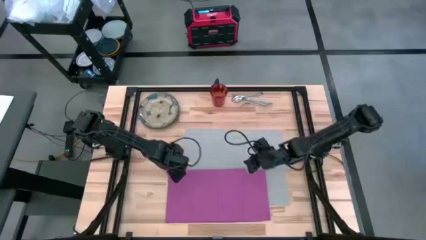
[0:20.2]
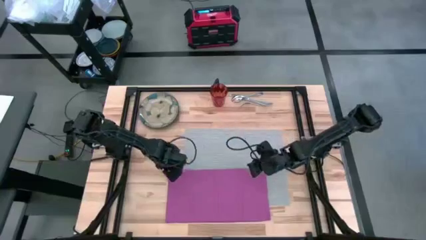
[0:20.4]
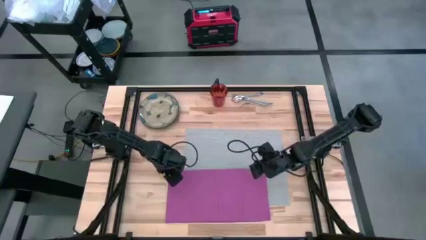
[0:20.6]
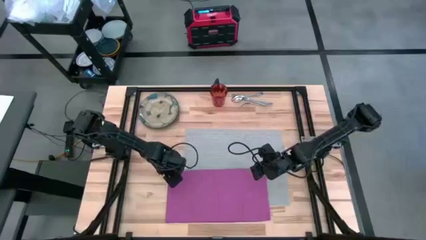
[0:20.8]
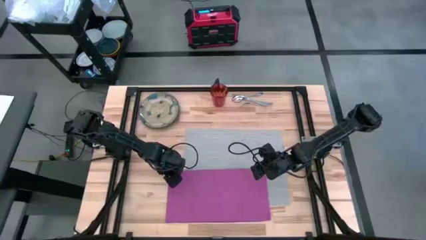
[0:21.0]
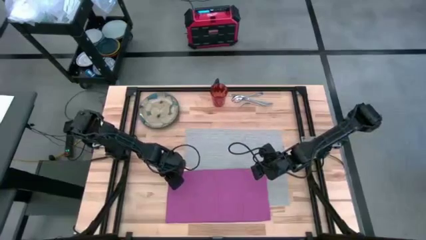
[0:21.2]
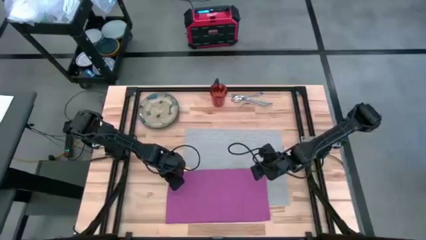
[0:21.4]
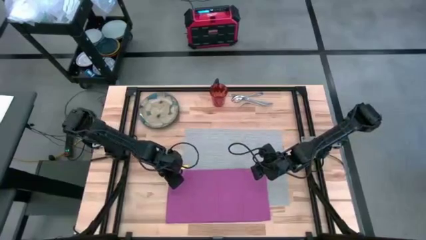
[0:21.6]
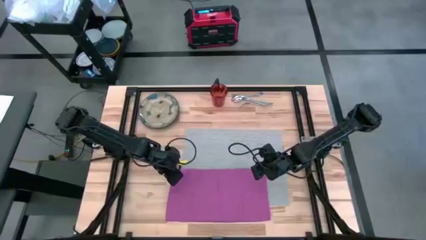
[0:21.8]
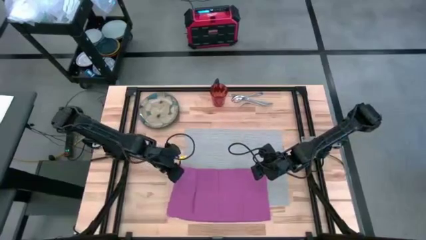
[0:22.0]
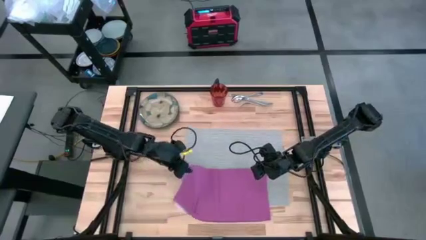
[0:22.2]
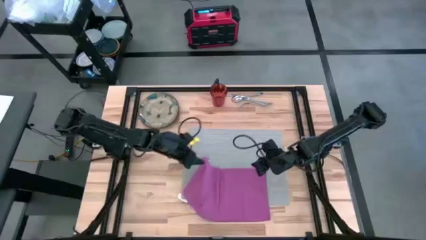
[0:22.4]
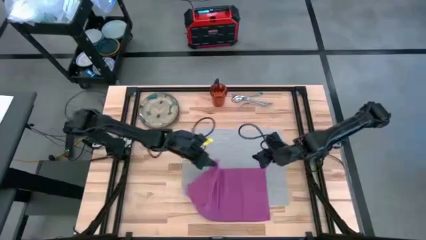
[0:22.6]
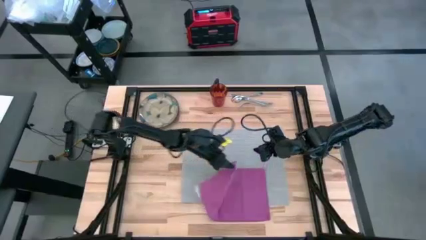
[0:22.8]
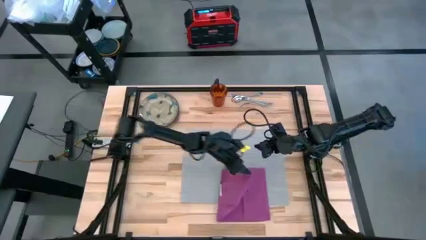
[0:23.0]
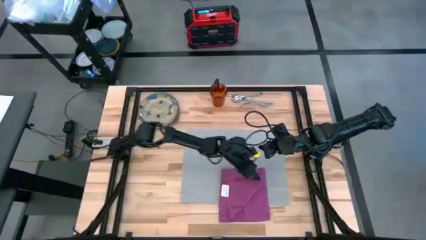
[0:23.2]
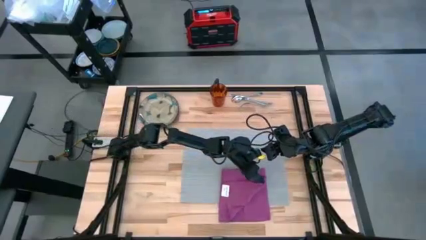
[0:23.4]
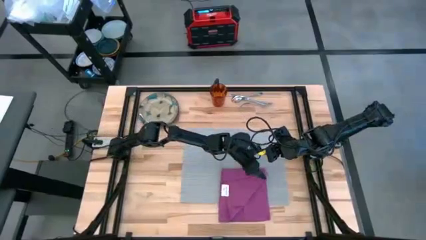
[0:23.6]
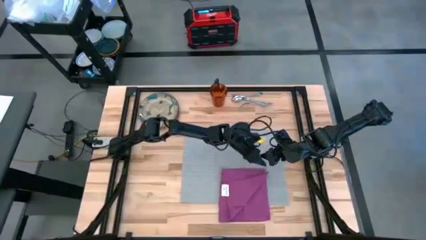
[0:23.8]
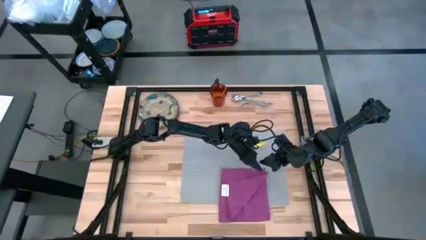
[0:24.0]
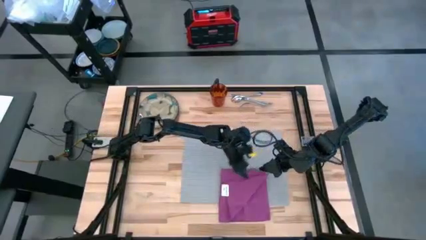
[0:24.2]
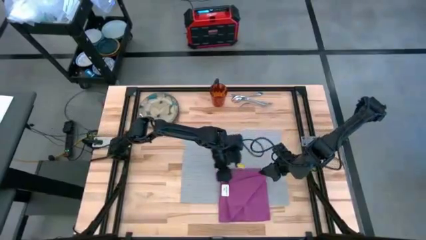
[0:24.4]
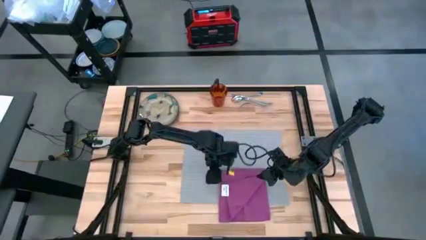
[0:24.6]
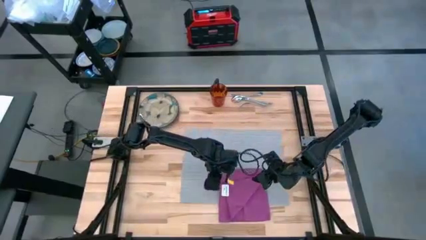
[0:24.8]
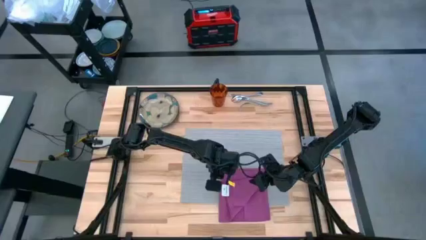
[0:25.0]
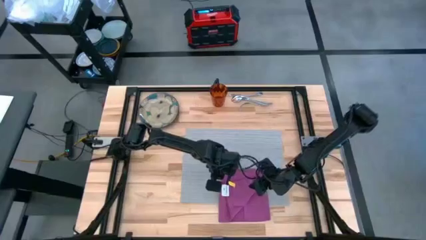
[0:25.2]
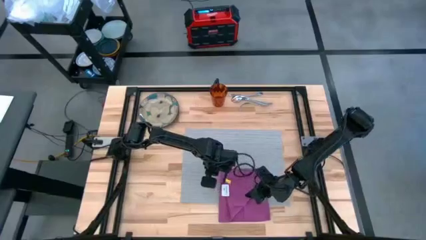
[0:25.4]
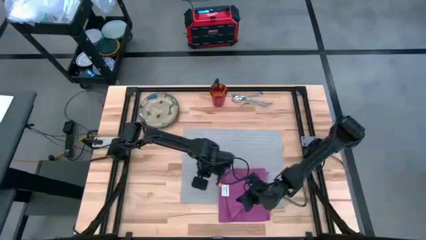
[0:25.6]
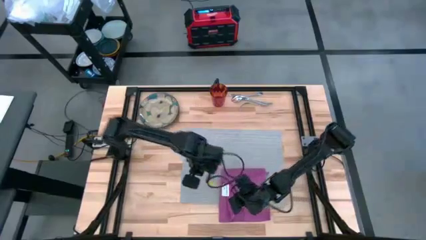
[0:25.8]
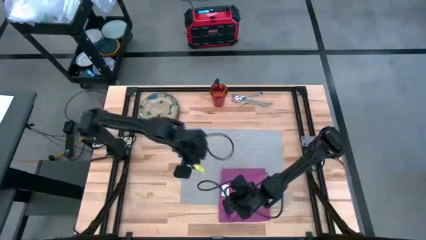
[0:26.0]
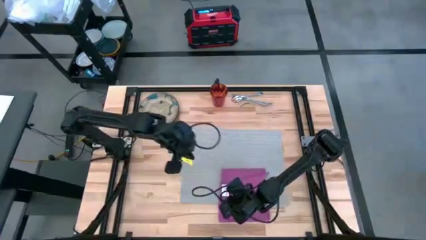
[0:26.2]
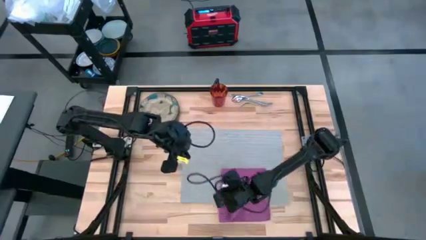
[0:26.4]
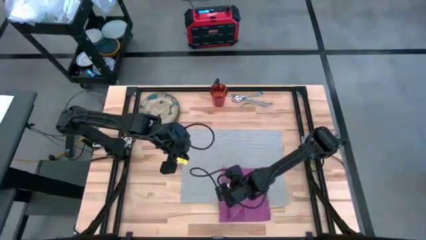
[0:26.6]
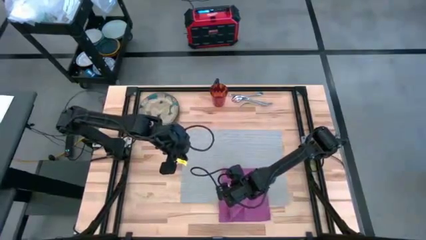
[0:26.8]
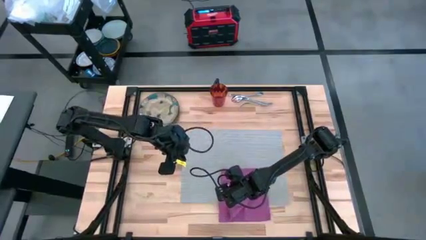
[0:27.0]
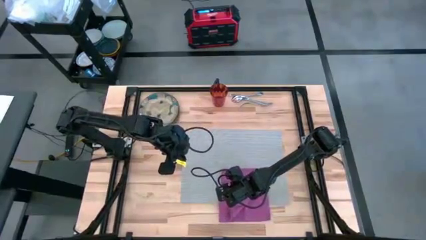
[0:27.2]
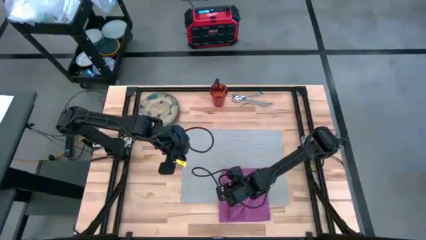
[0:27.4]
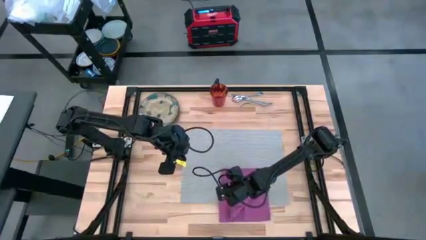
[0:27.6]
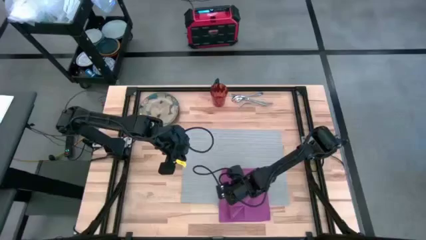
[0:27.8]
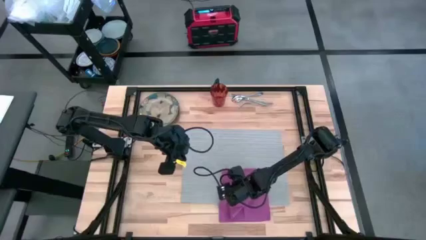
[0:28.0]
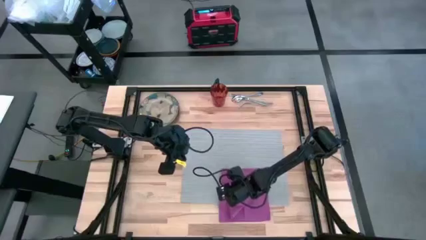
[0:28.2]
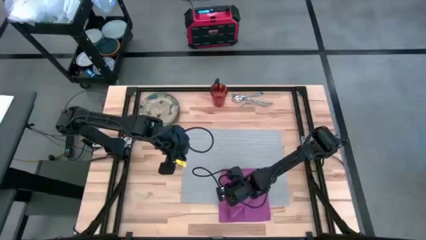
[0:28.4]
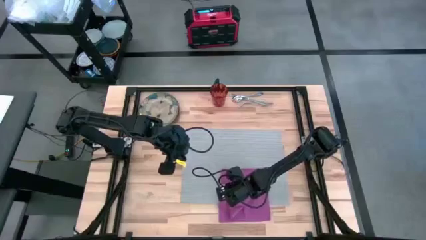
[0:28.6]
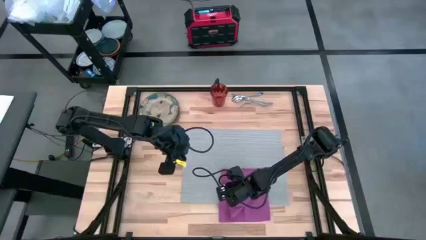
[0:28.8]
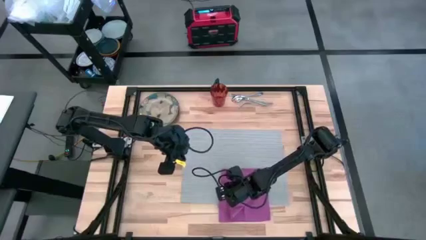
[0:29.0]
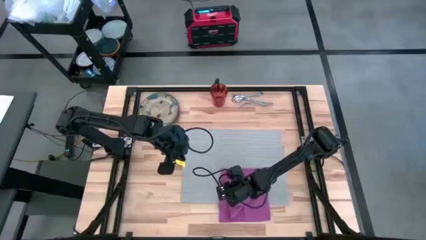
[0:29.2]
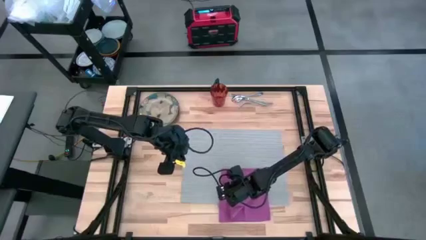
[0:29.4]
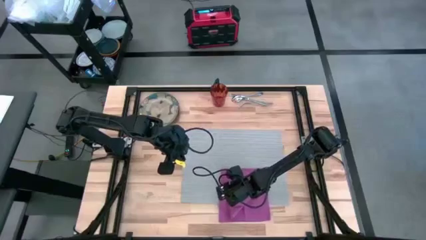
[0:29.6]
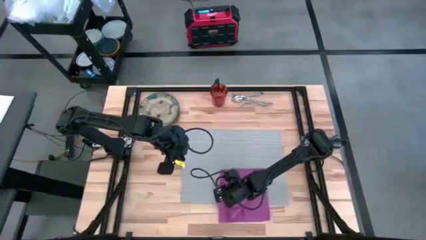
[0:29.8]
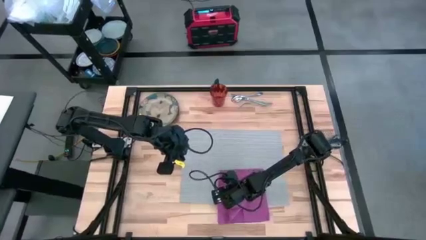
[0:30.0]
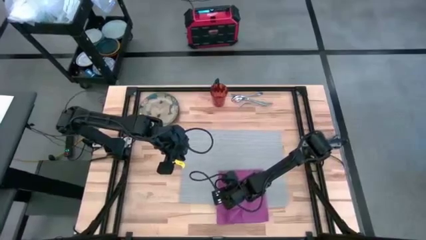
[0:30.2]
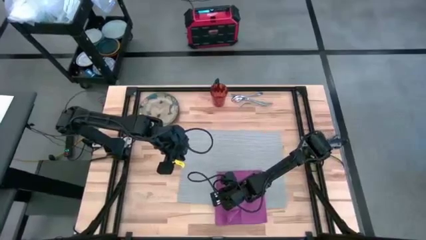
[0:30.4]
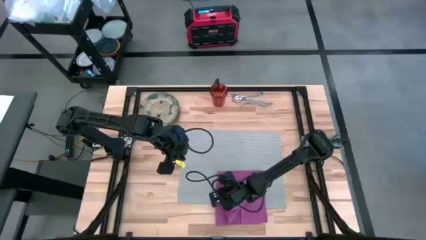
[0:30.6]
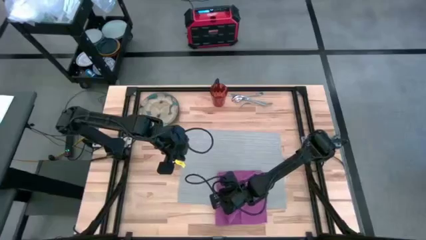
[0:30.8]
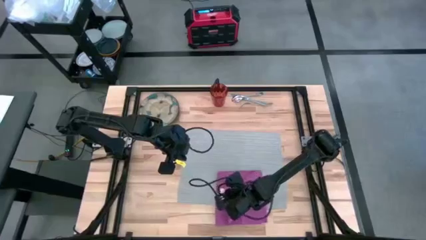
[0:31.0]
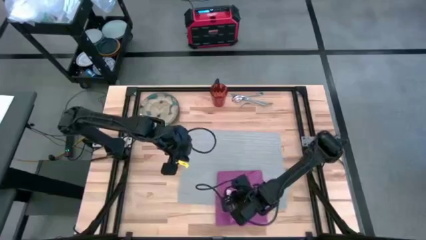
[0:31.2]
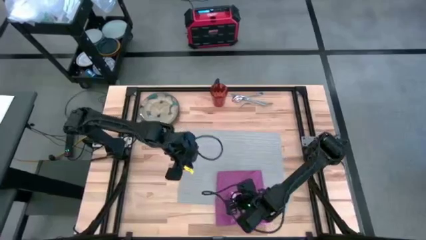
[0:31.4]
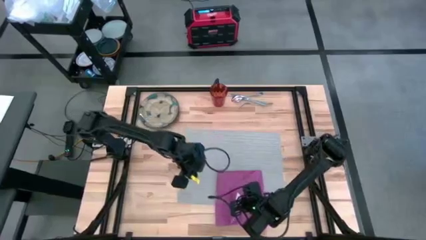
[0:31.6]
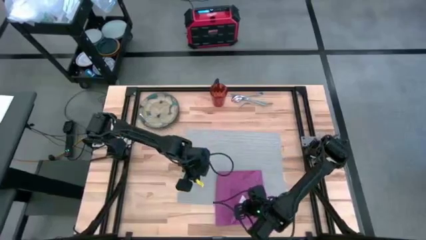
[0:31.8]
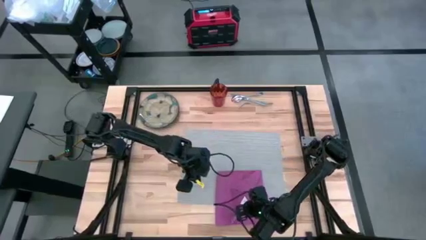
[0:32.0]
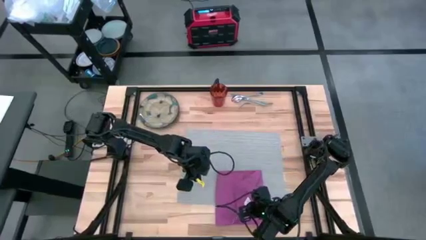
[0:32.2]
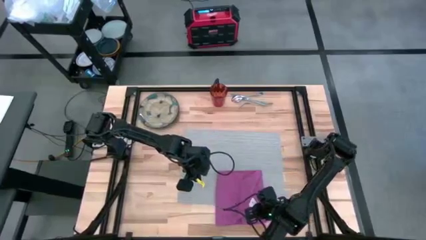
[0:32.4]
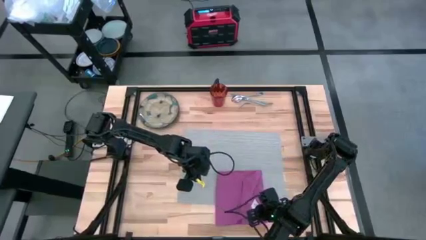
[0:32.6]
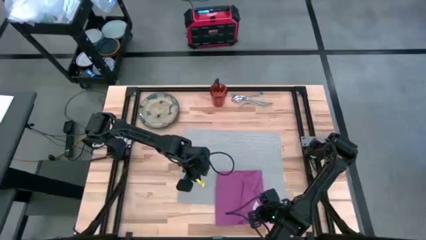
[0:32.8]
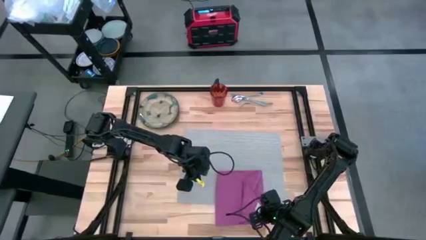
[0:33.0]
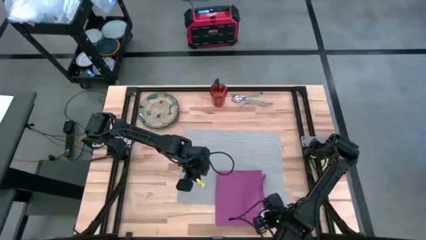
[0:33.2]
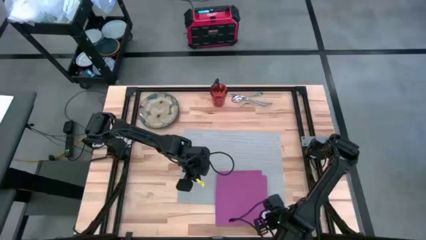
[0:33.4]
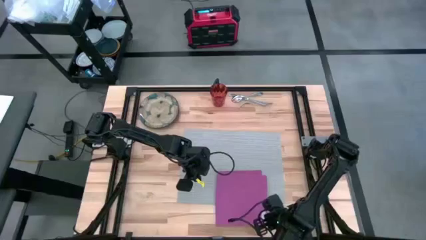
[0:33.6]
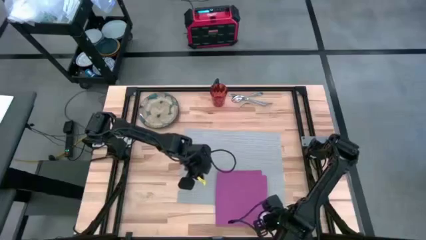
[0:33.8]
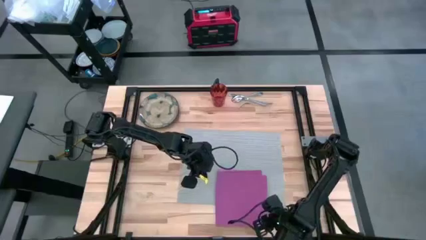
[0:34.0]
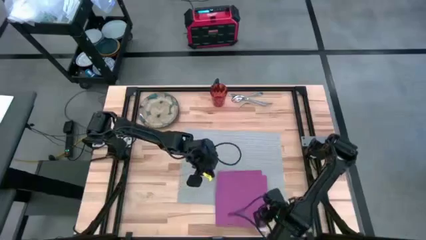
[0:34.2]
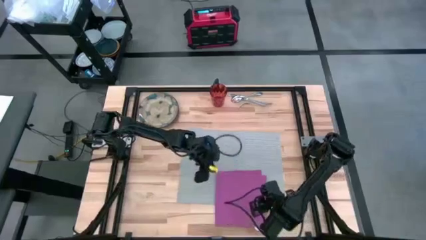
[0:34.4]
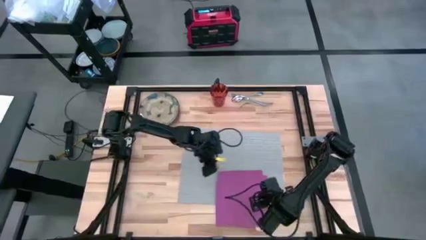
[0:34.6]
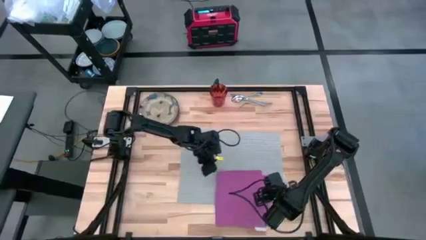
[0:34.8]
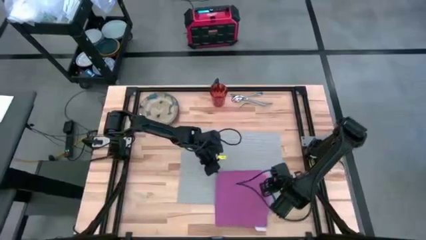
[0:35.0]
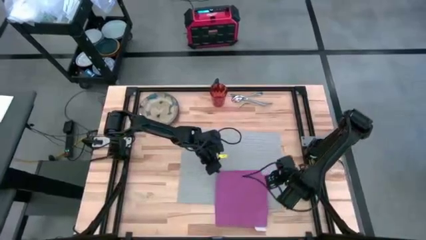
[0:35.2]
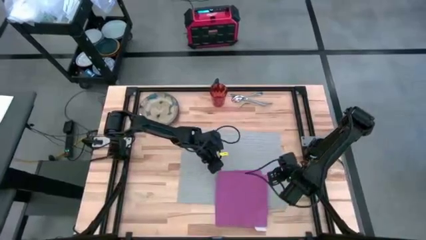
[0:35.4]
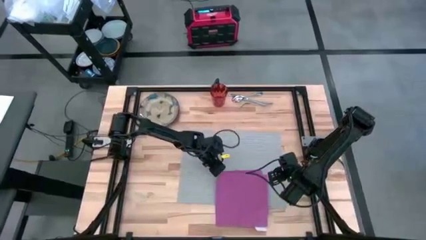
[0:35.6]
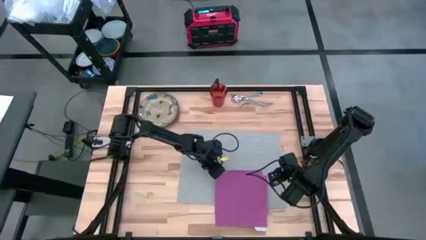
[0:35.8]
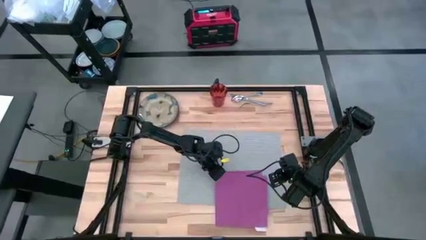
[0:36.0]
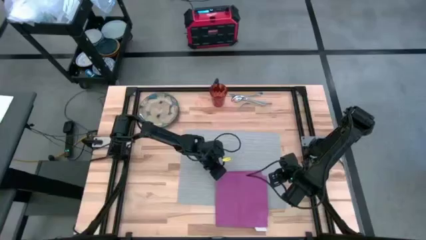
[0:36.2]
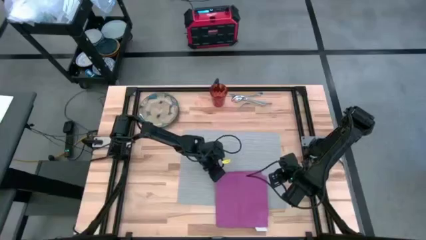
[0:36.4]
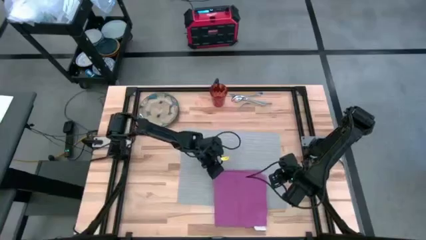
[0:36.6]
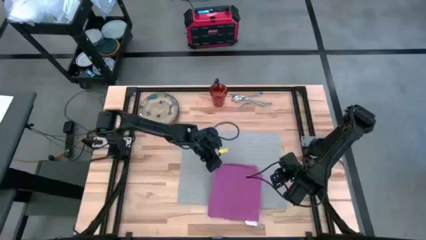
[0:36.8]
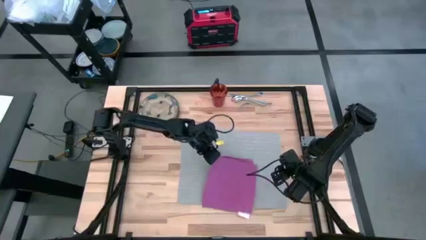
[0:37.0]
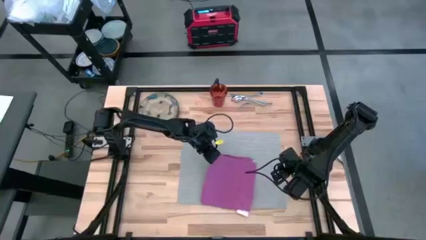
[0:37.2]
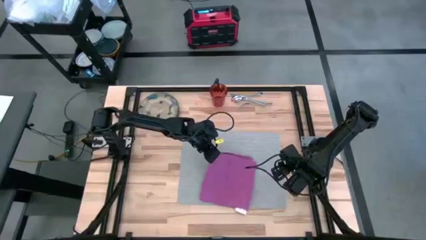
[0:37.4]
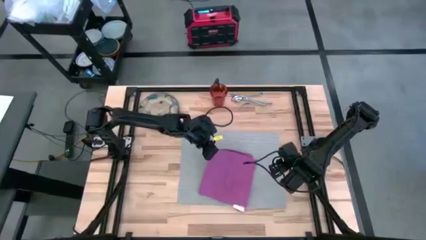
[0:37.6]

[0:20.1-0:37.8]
Task: Set table place
Fold the pink table napkin
